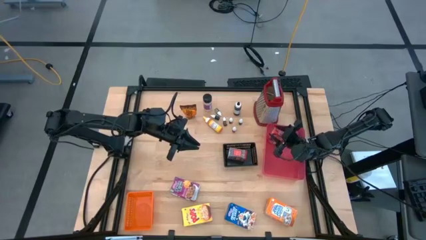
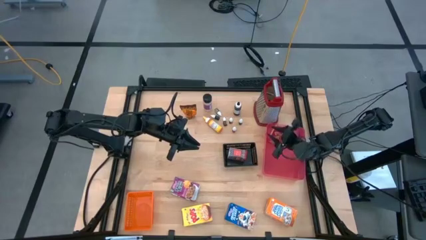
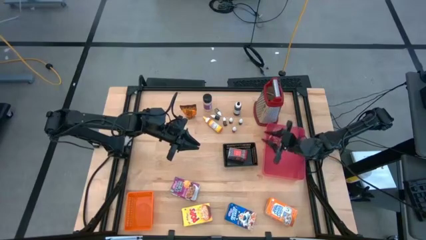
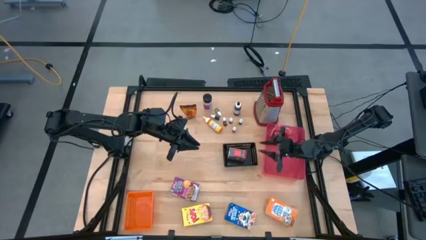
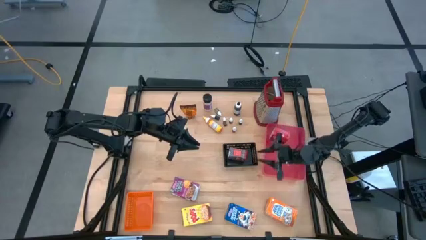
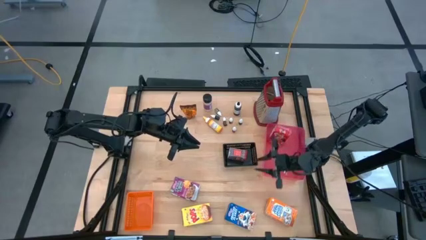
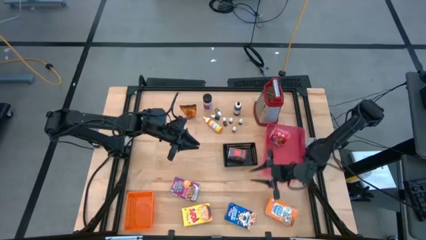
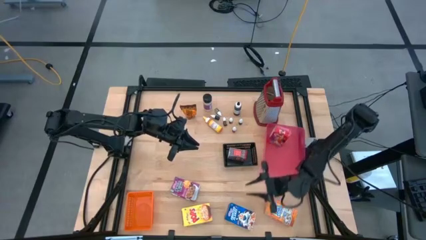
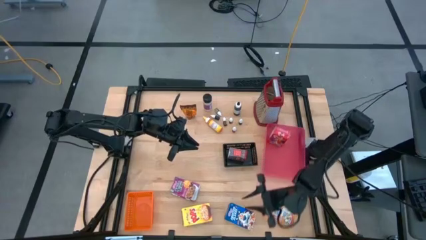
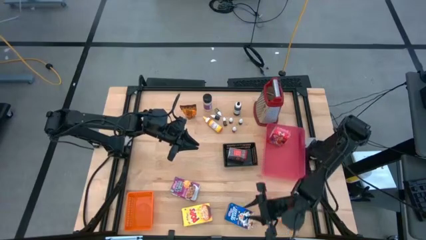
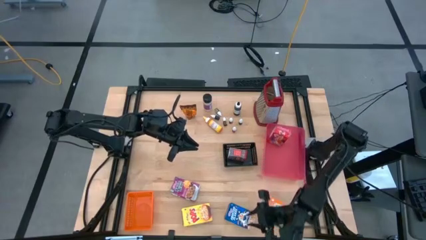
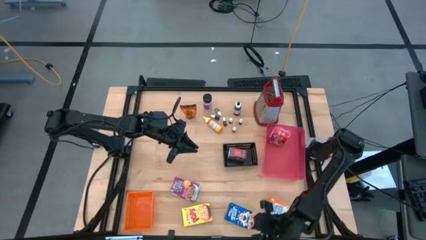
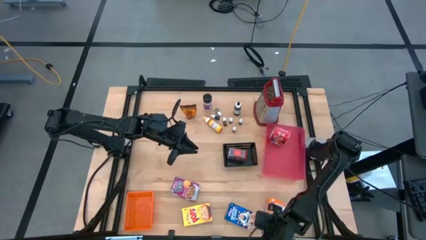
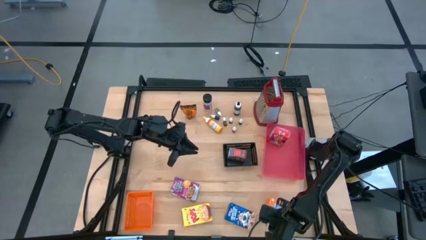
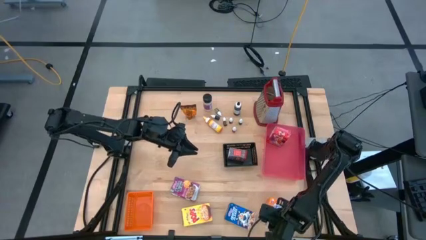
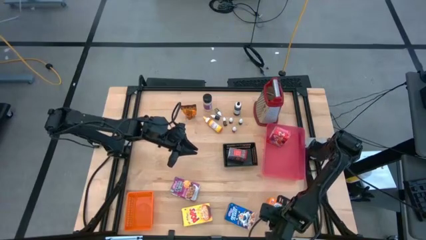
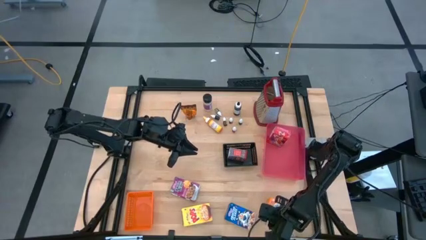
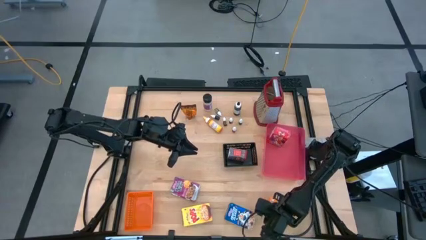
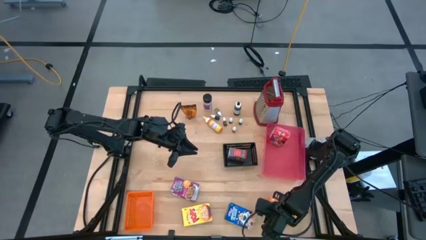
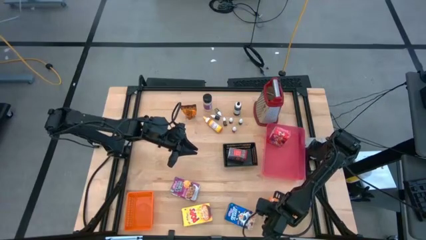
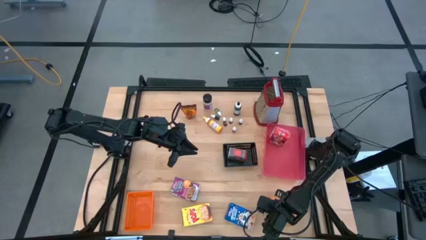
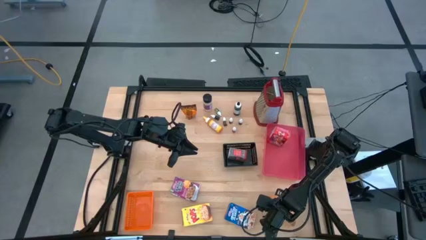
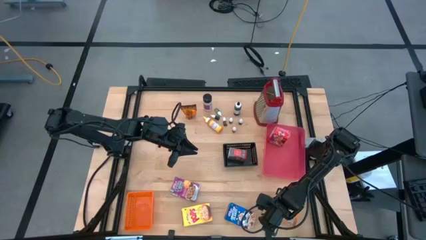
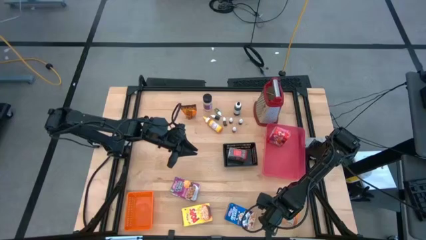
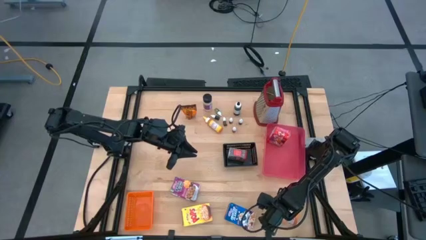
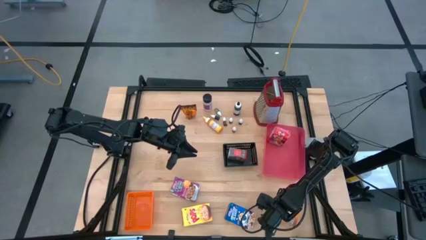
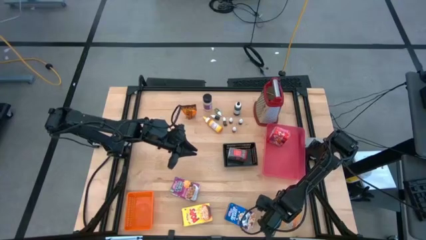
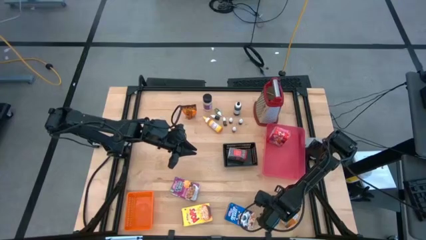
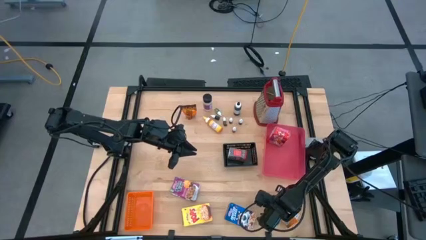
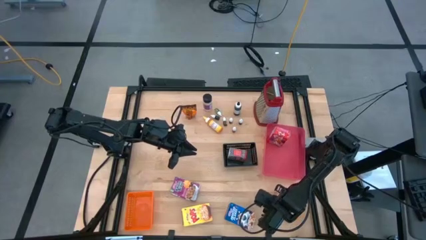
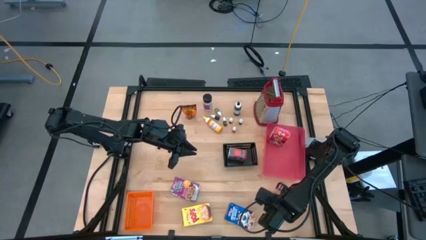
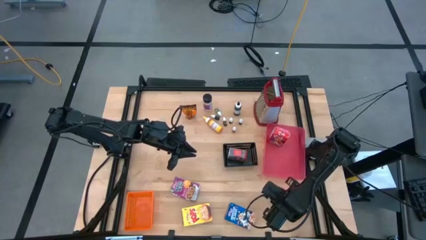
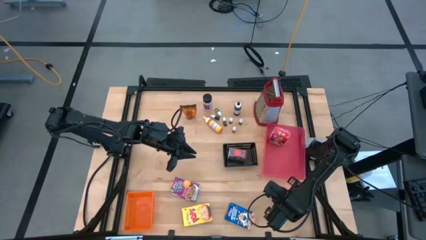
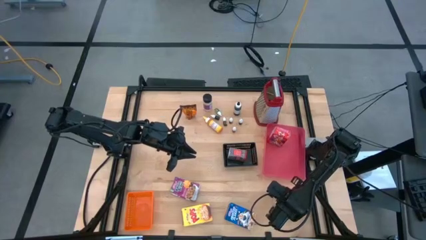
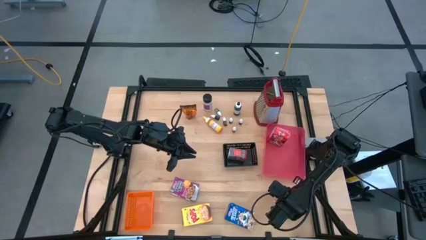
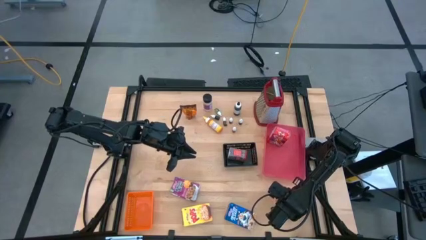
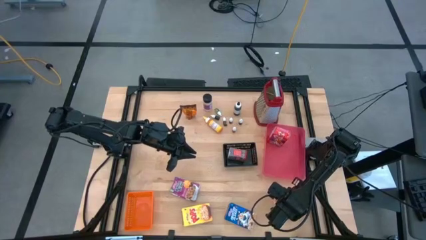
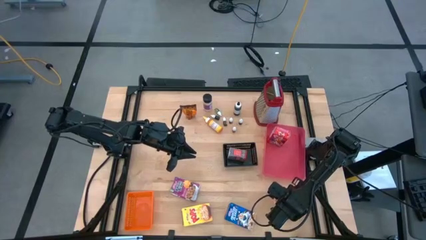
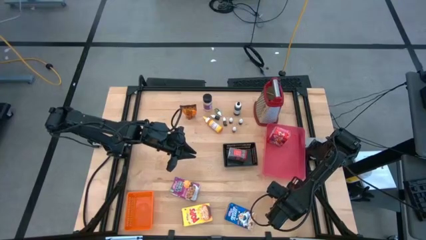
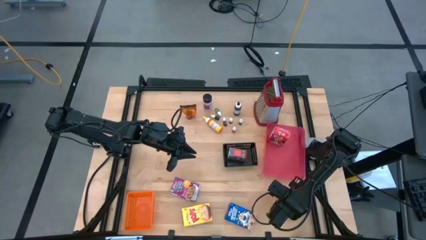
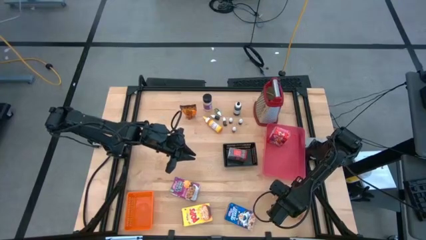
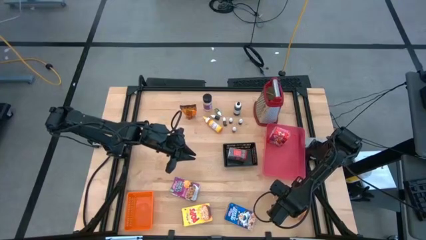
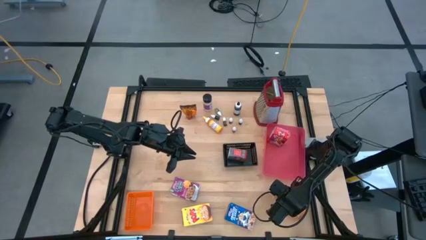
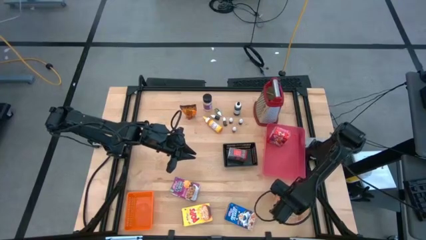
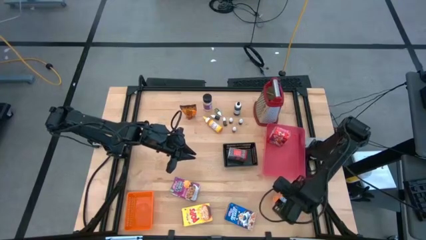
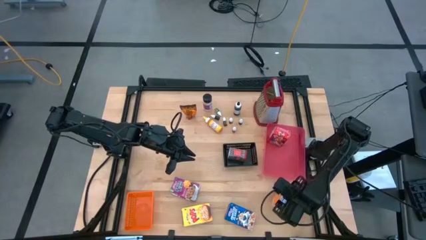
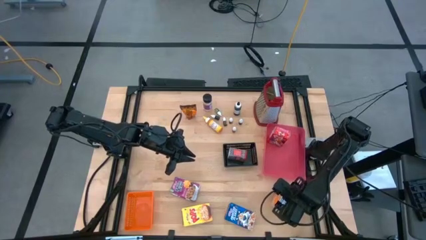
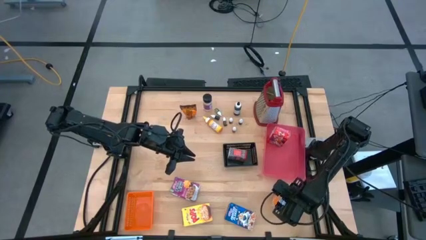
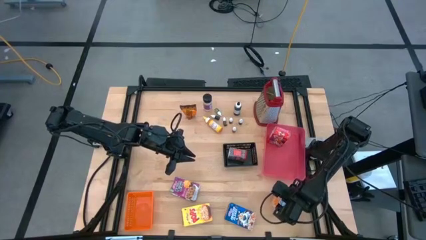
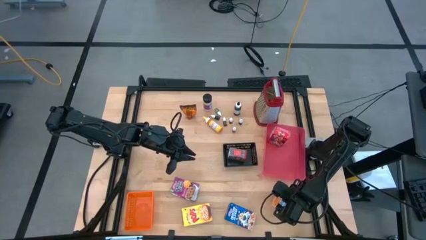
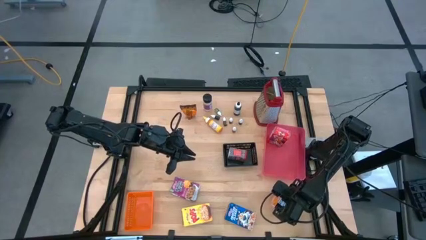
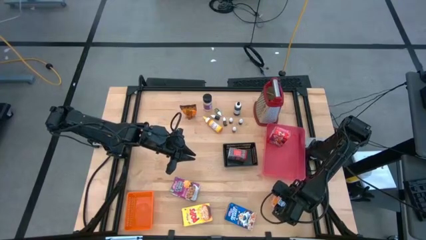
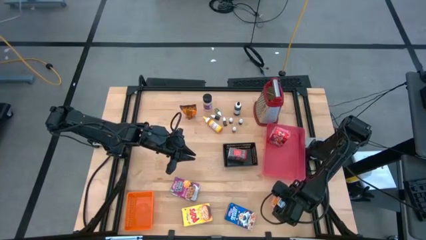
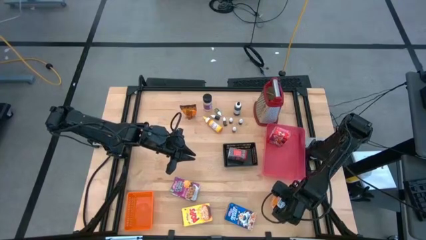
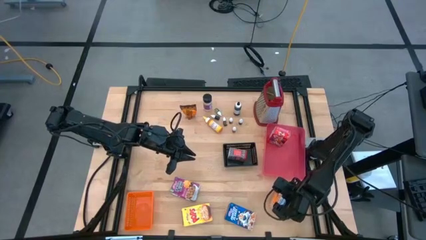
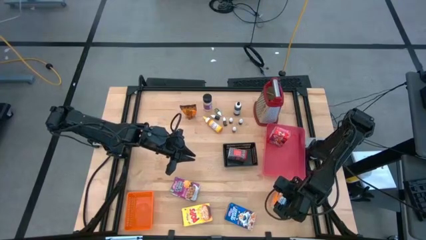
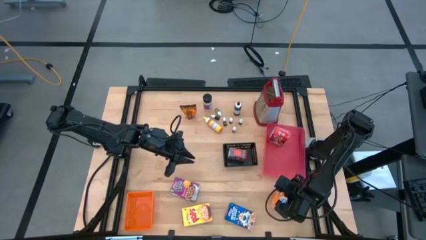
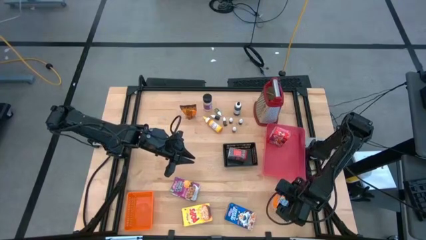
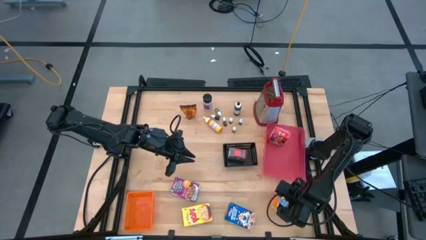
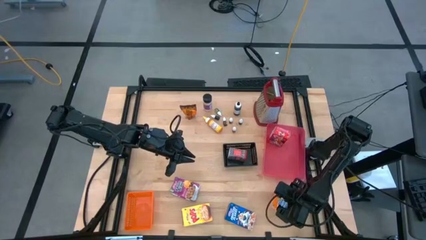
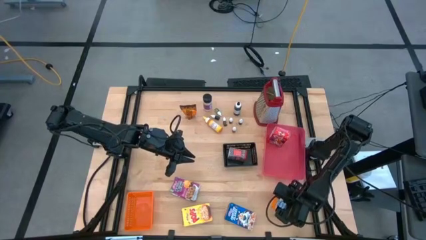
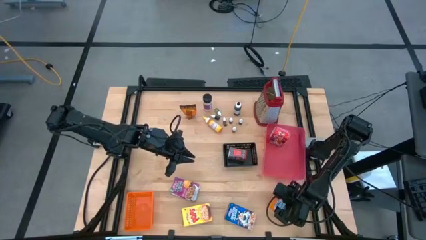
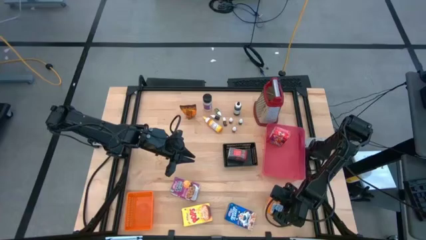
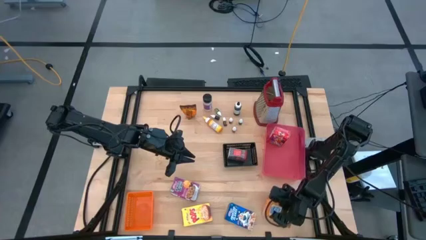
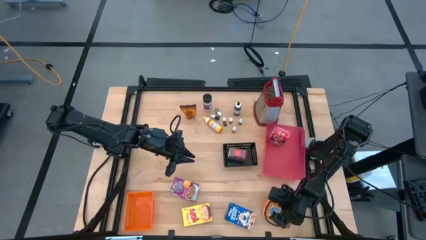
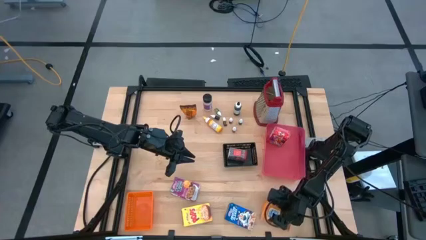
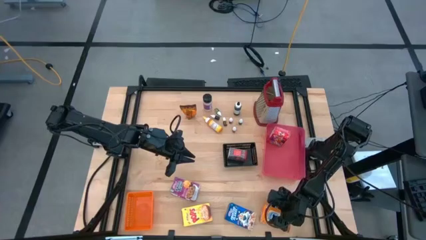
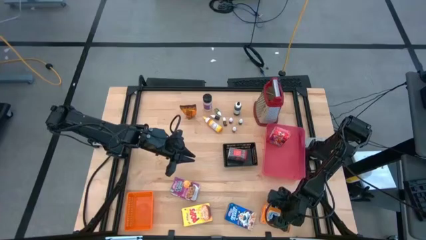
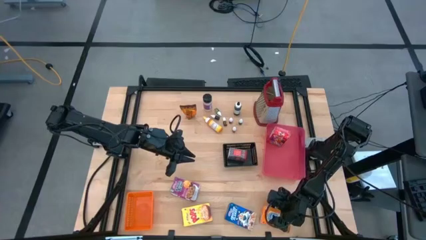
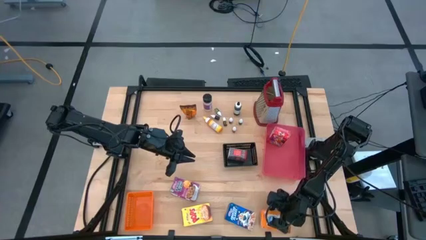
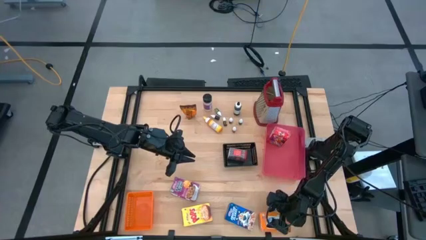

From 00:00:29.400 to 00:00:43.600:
Task: Pick & Place Kitchen Items
Put the orange cereal box into the red bin

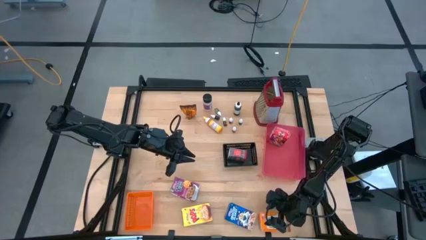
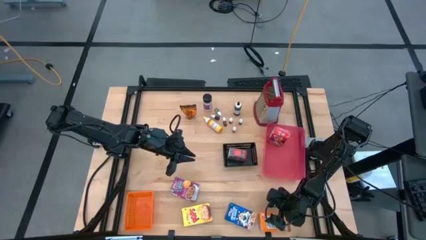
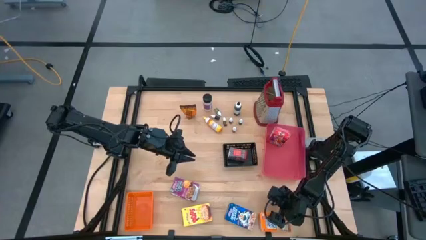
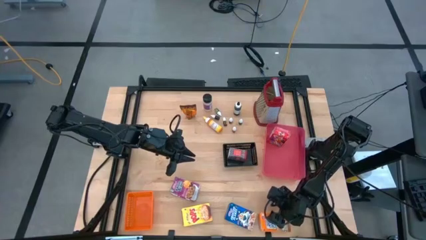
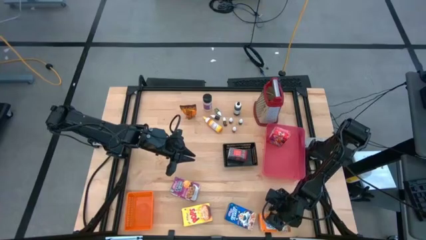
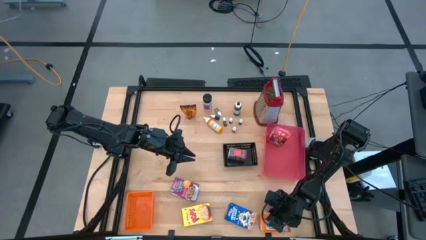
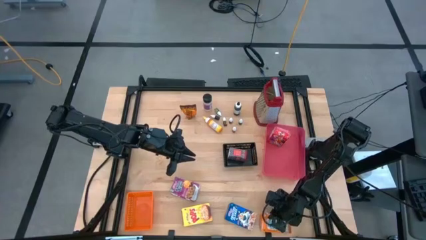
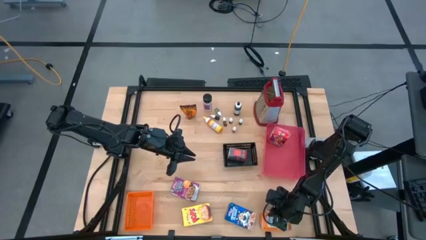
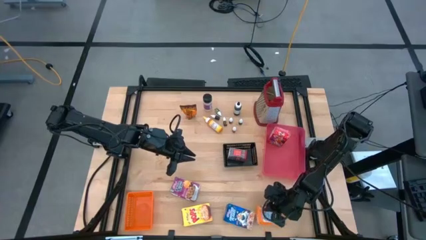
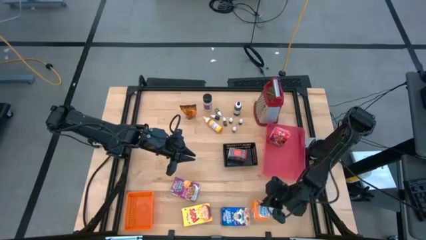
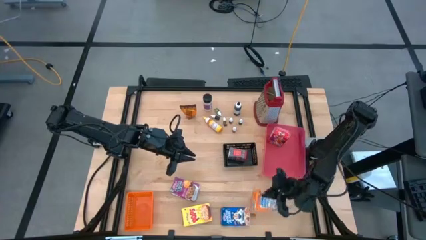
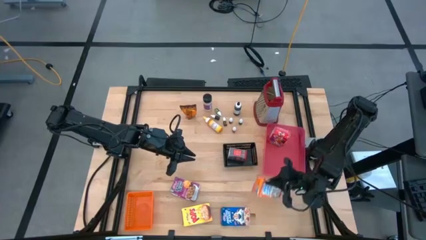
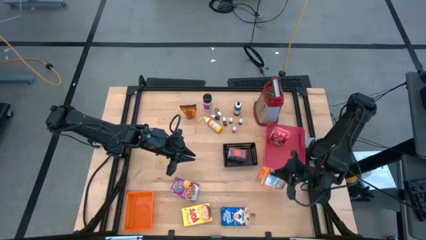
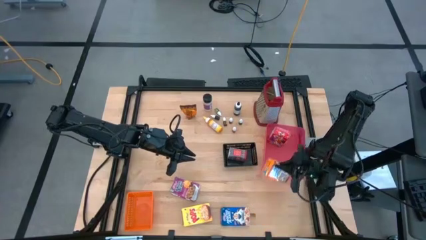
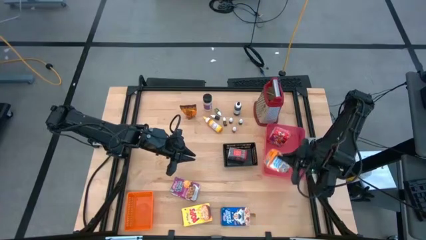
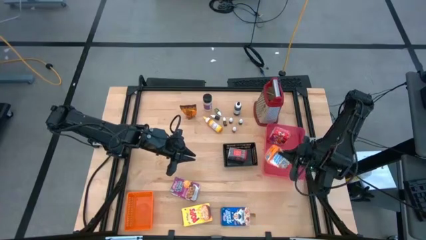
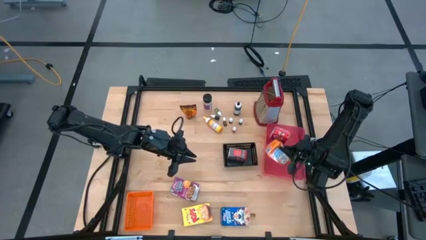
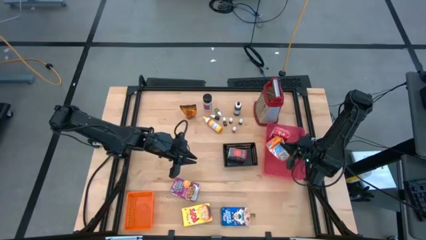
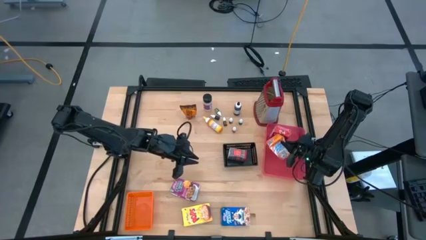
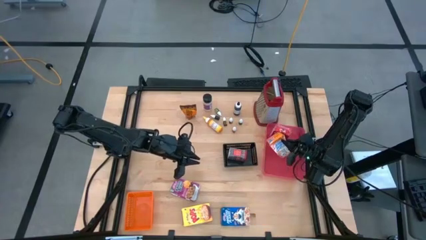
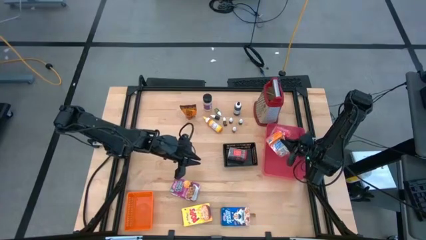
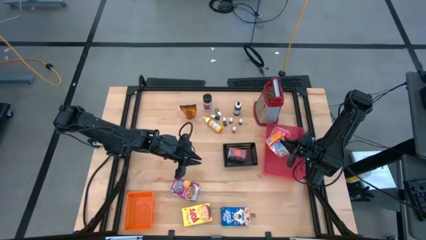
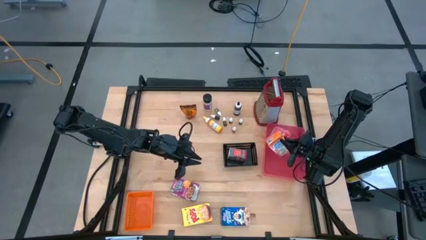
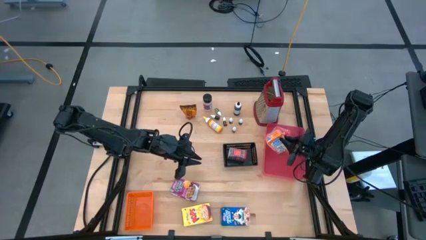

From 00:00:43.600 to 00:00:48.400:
Put the orange cereal box into the red bin
